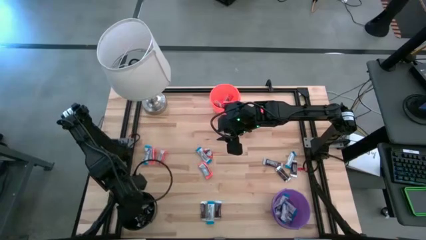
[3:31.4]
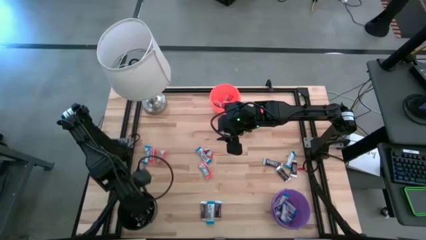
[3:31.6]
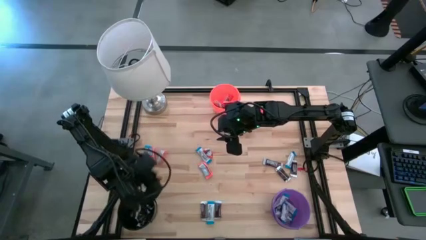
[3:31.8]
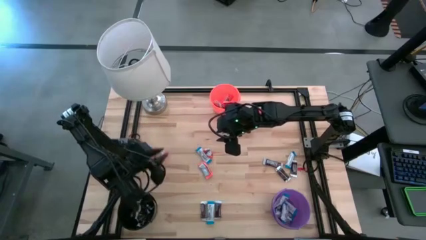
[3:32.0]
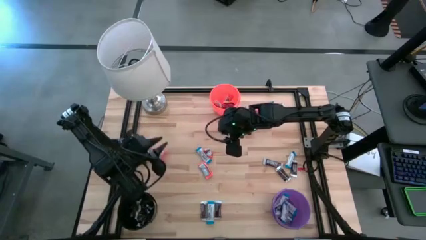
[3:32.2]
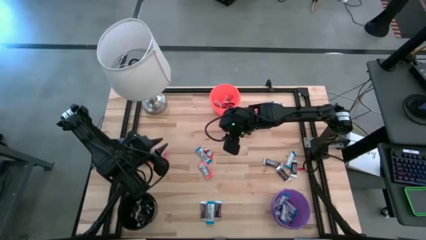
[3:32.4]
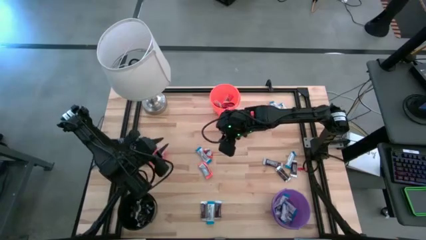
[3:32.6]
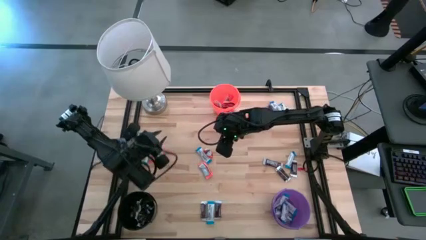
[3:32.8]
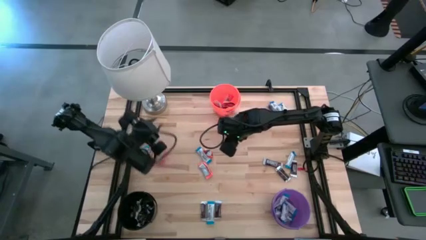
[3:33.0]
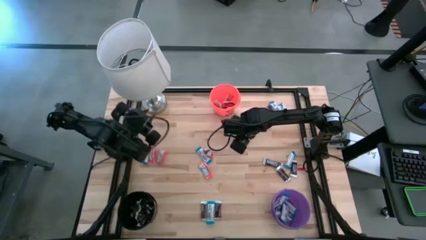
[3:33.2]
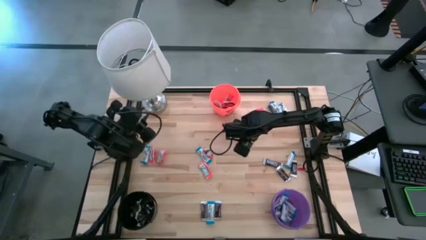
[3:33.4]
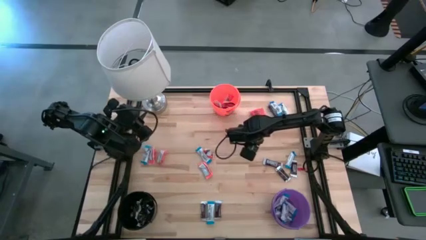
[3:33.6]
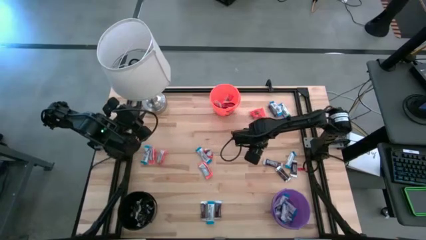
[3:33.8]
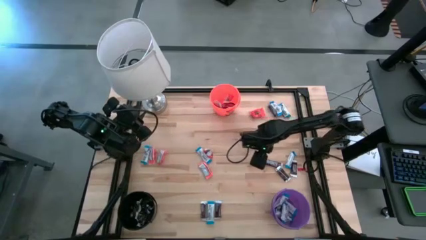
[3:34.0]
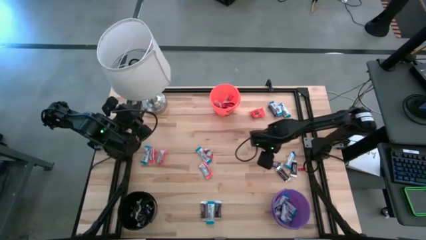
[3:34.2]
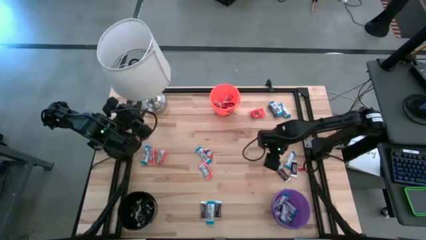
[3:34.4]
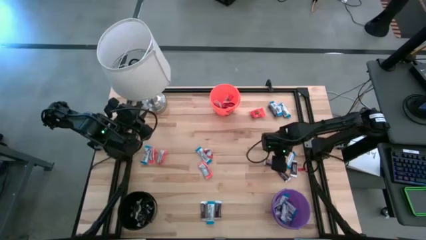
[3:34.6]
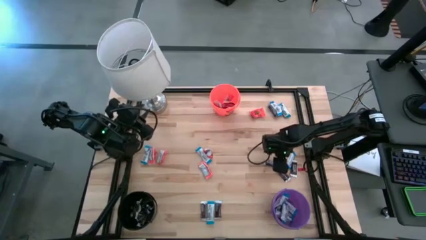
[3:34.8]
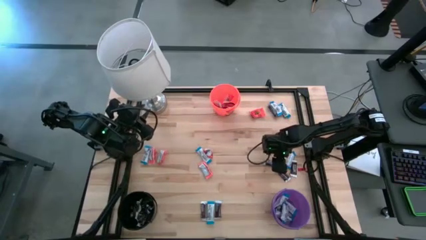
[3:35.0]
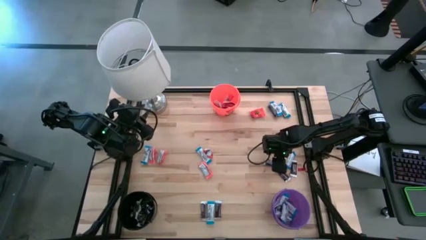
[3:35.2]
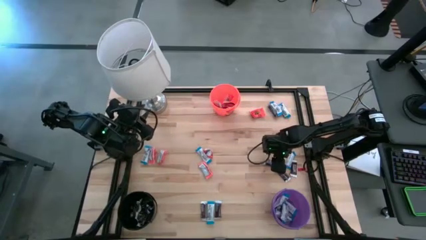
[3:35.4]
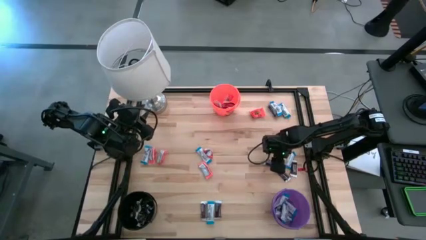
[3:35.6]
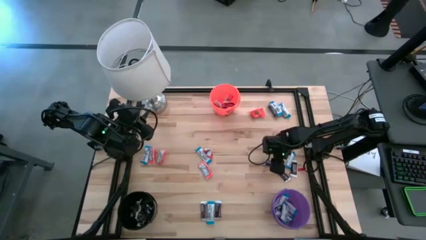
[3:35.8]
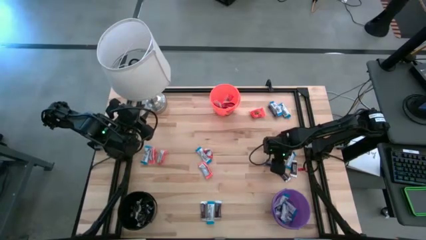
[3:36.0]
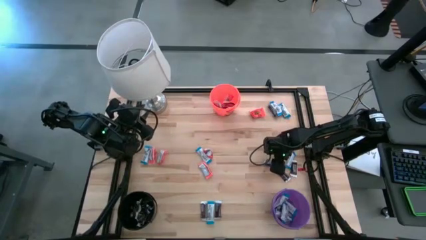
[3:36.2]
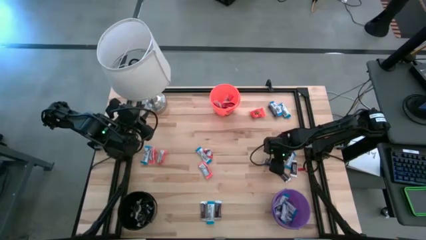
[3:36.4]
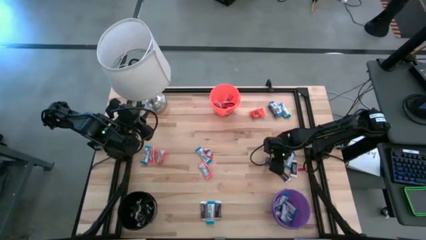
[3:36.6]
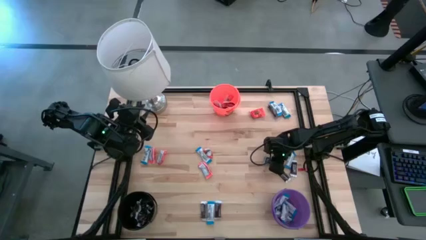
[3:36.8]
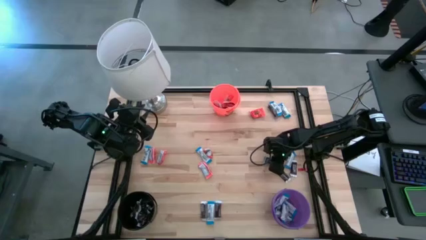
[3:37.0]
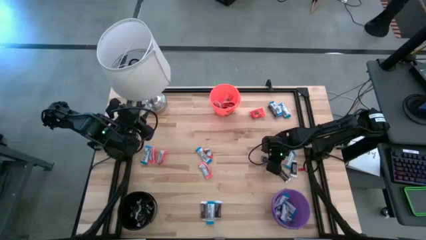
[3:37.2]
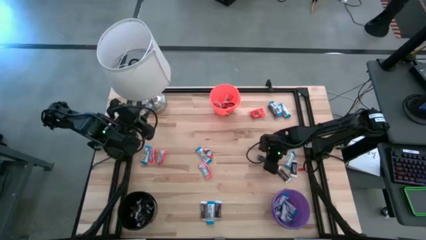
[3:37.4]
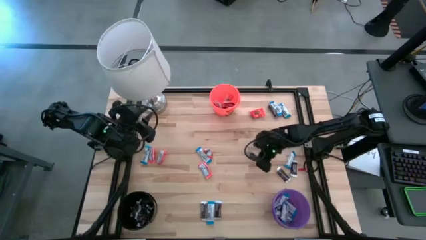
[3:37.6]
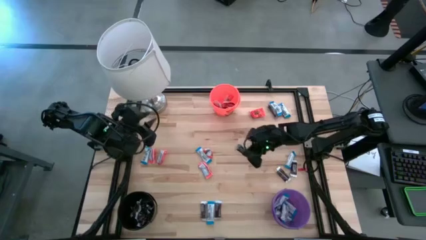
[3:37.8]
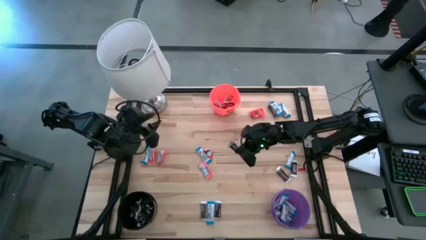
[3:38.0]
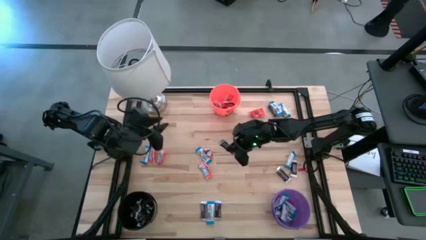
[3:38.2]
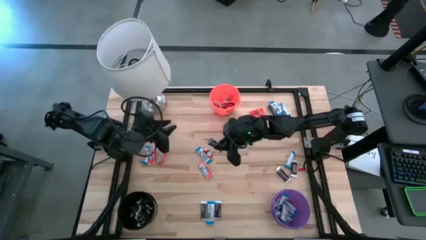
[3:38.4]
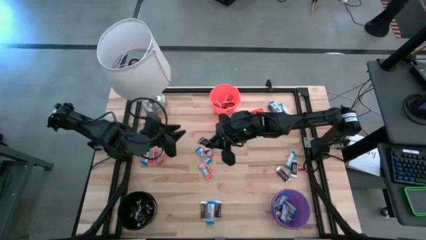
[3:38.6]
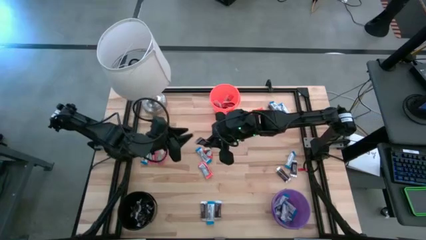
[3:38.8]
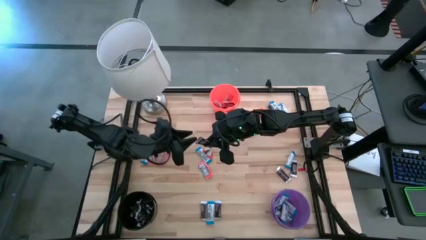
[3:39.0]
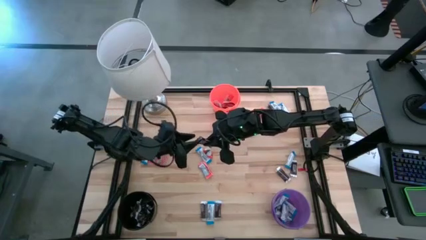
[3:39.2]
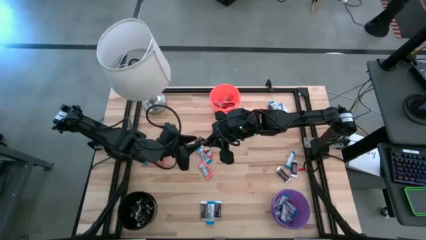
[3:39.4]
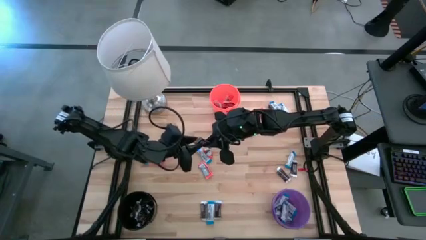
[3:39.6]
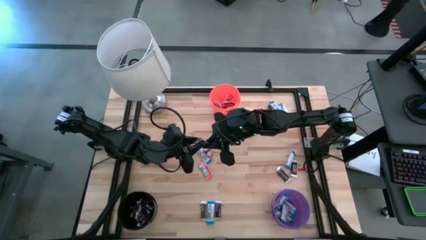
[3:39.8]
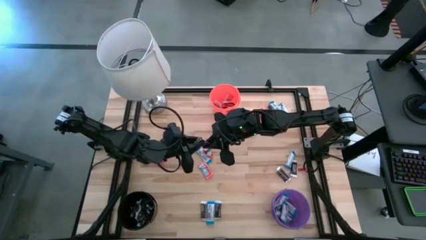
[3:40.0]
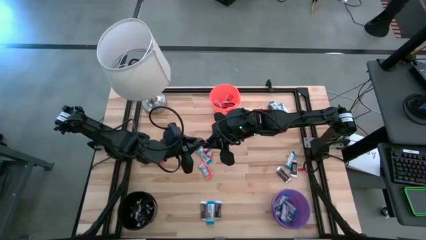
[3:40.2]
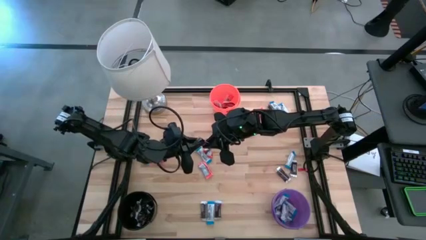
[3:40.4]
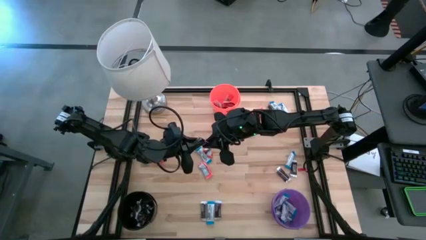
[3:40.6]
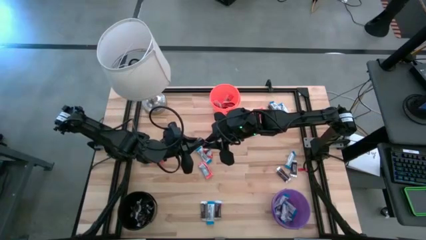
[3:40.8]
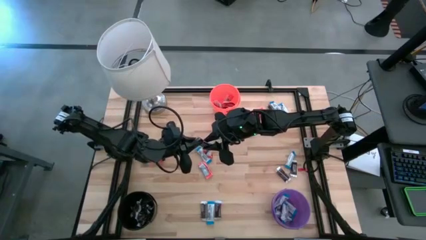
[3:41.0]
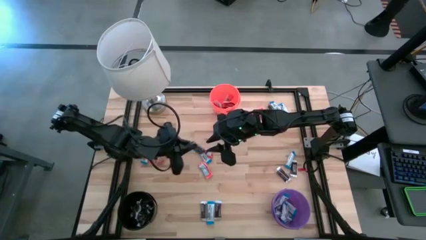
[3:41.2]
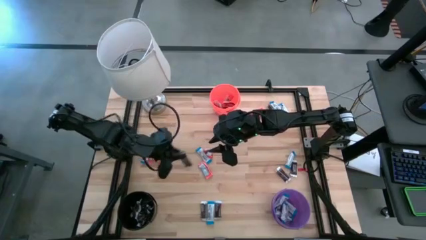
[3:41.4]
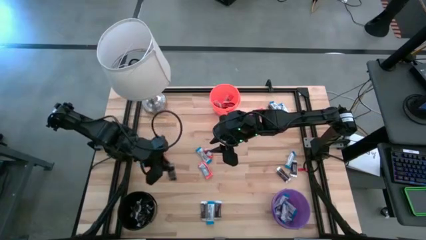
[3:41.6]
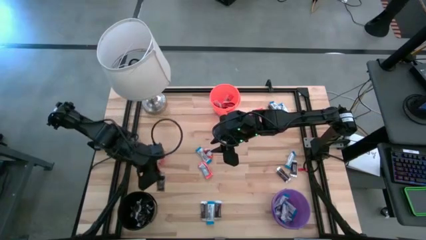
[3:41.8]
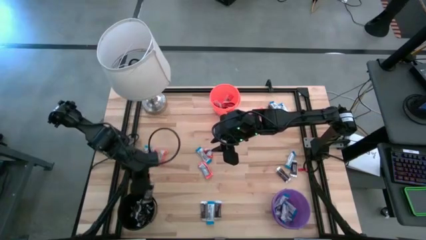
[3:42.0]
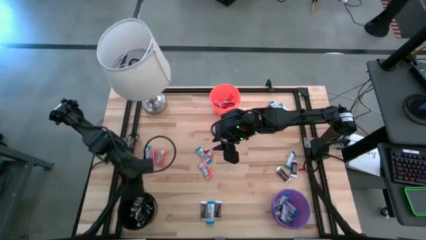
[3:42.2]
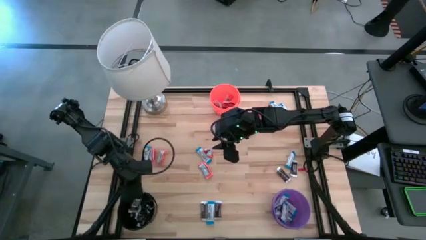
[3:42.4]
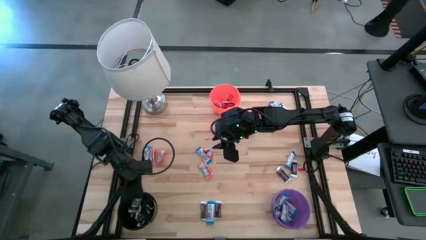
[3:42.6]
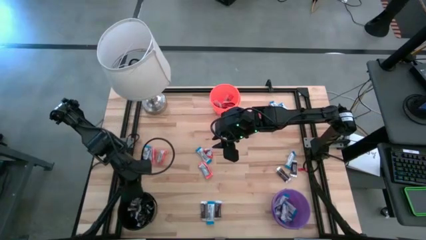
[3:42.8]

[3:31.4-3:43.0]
Task: Organize candy in baskets
Put the brown chocolate into the black bucket

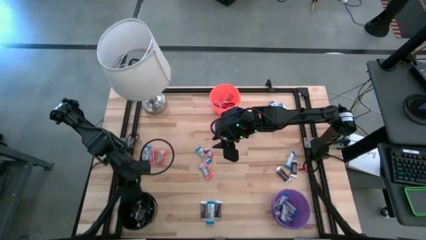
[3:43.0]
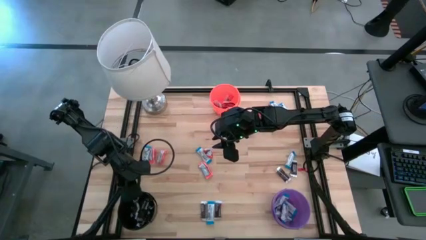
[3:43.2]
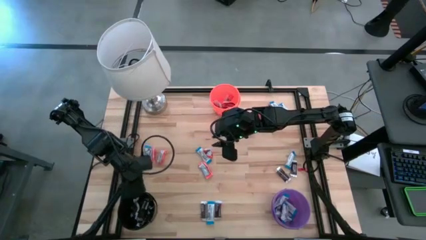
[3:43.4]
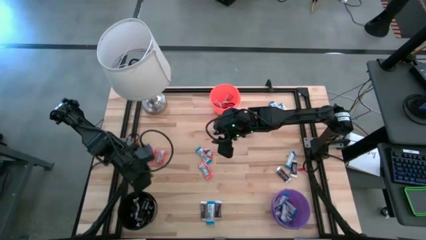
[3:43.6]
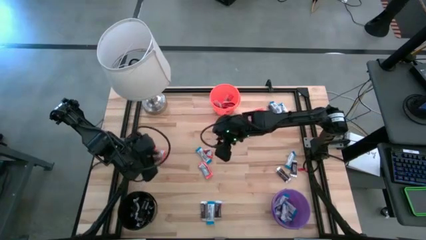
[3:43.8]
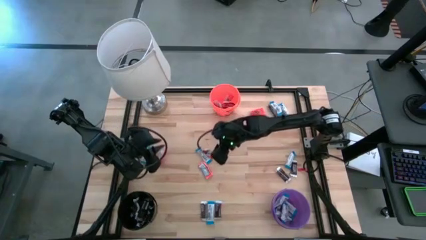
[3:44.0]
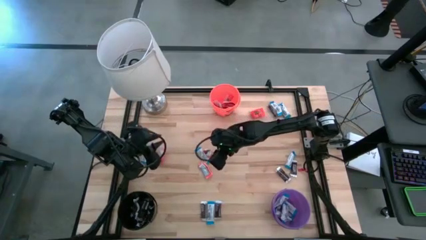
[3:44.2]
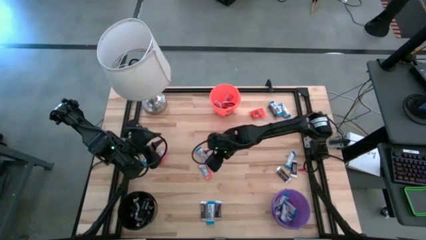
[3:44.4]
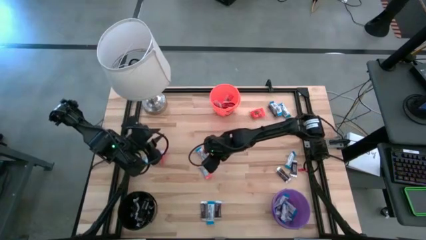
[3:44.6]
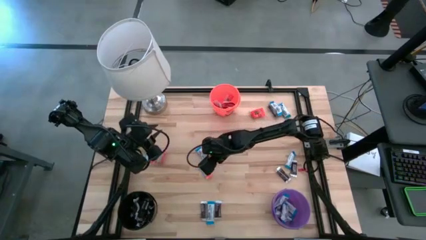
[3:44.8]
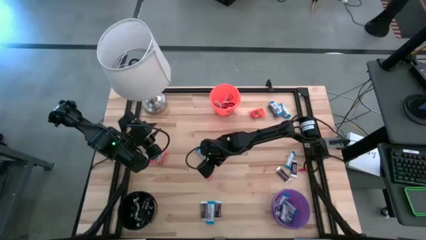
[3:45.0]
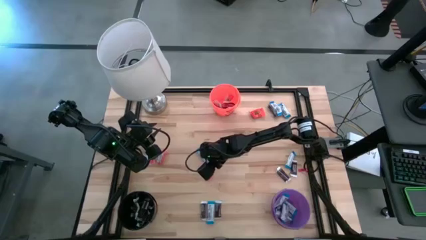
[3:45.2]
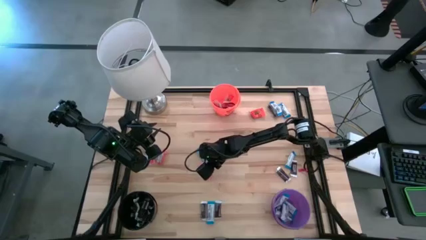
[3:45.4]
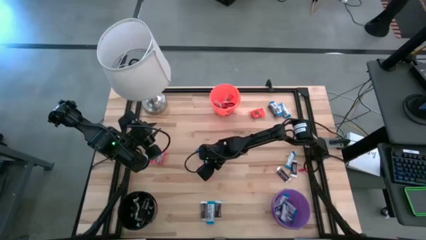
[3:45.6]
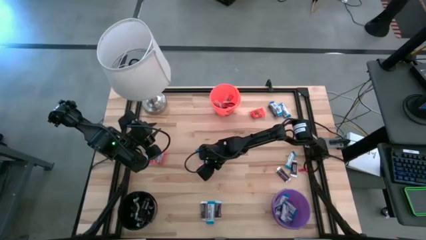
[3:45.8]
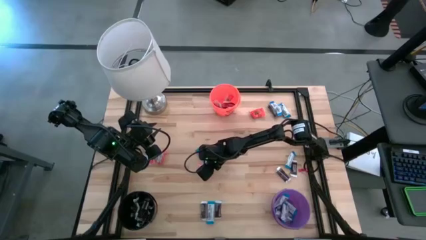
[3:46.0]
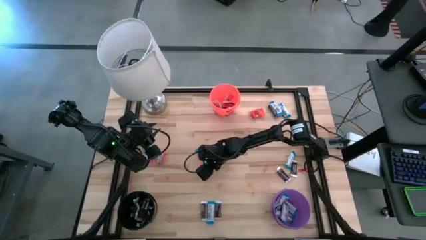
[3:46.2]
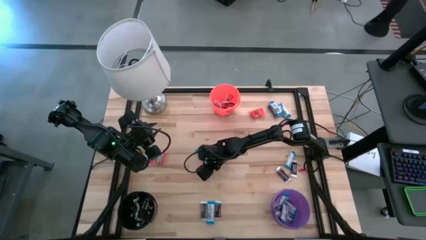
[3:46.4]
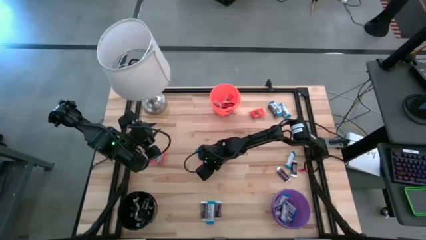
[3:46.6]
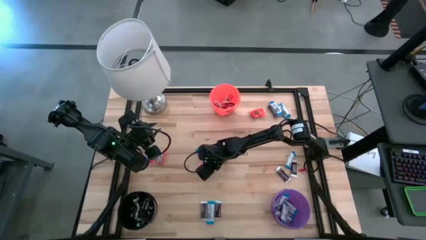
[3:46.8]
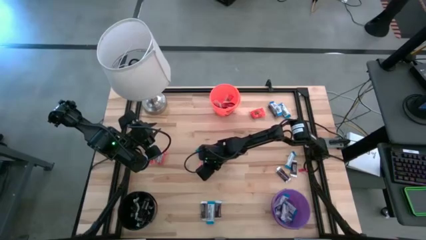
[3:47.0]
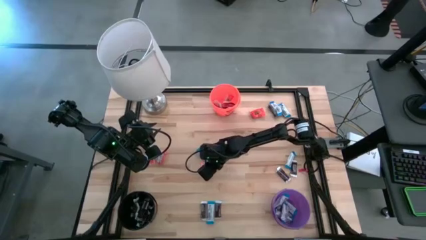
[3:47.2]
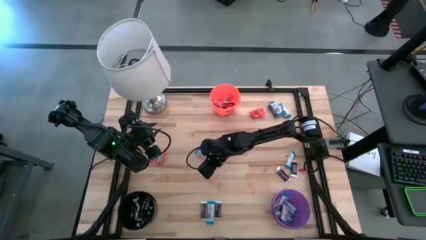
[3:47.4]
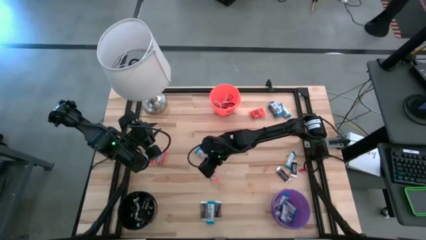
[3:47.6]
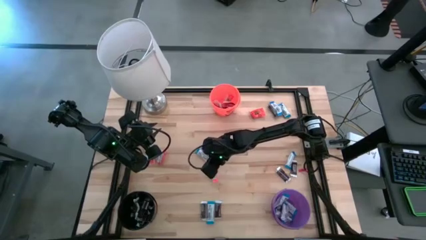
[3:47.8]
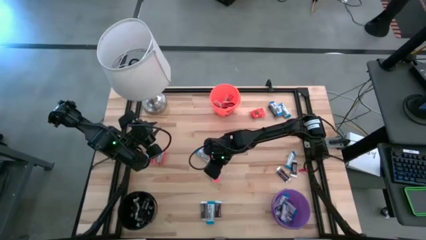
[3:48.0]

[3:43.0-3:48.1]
Put the orange chocolate into the orange bucket
